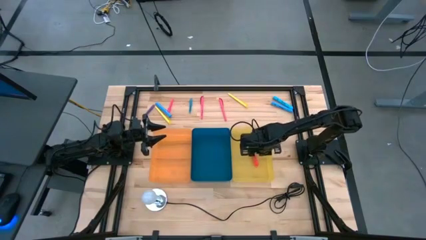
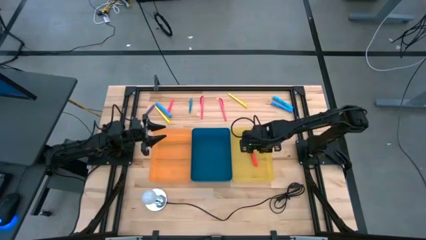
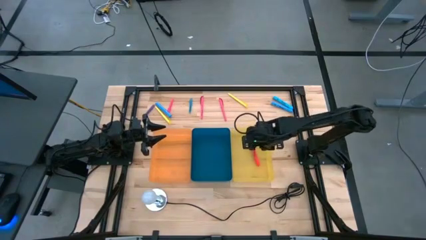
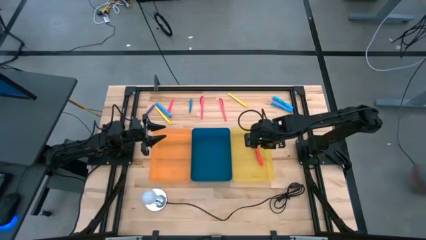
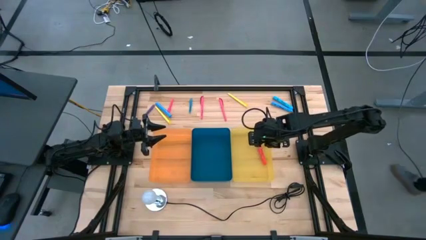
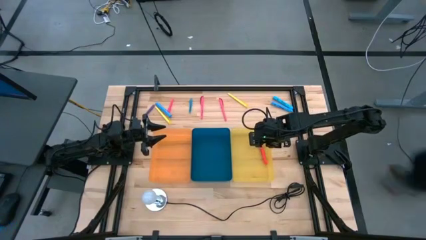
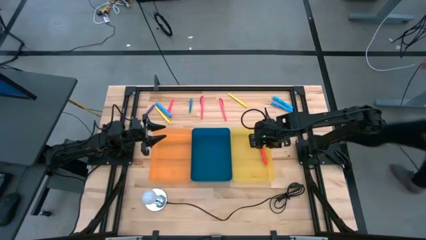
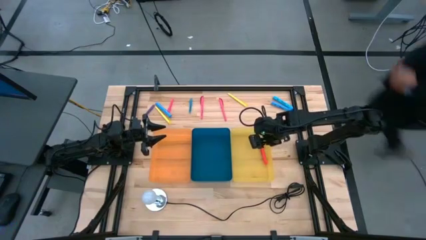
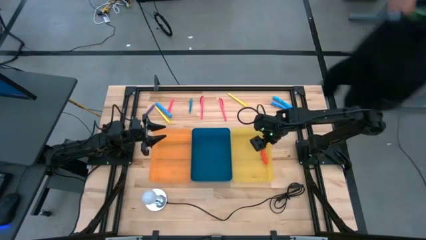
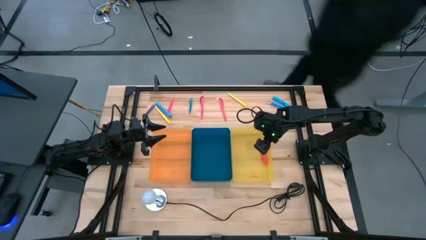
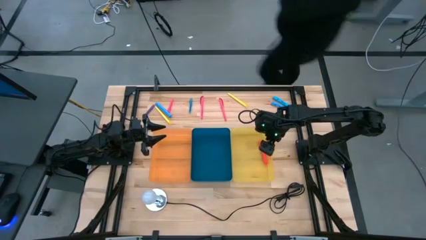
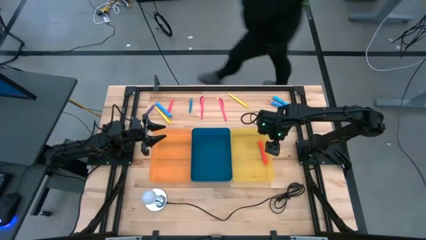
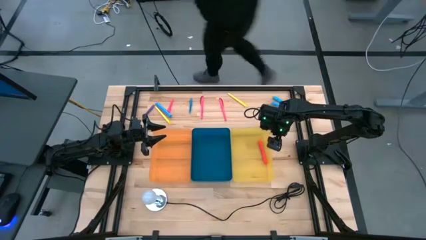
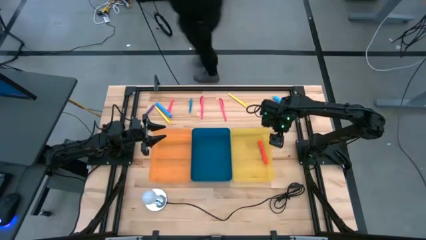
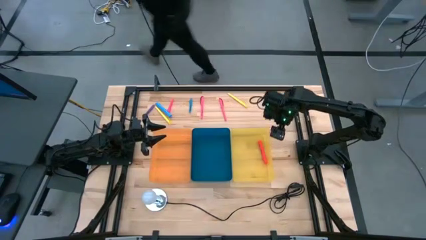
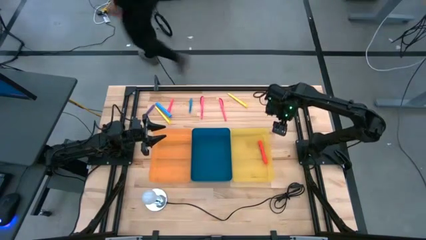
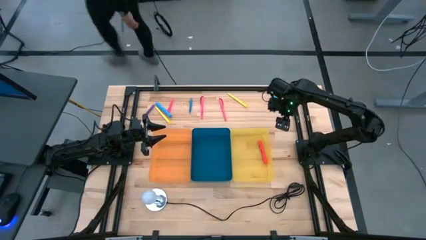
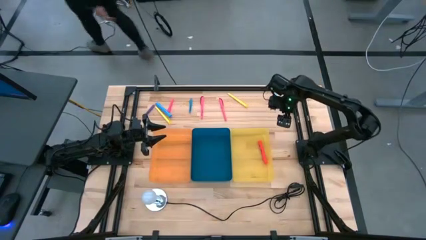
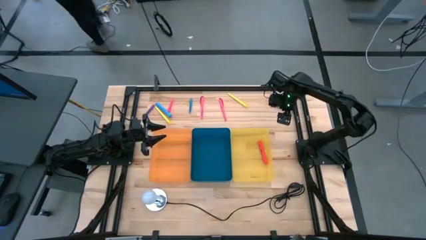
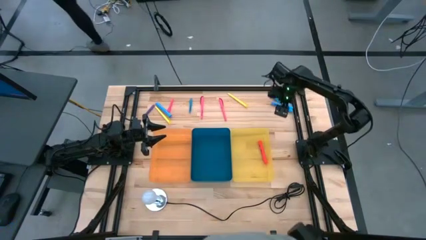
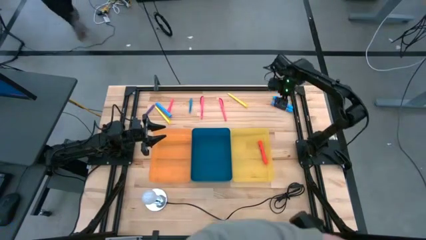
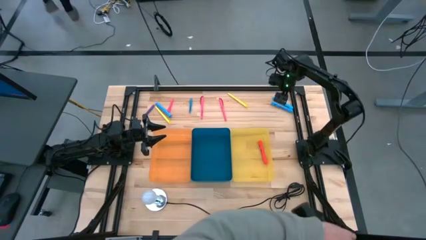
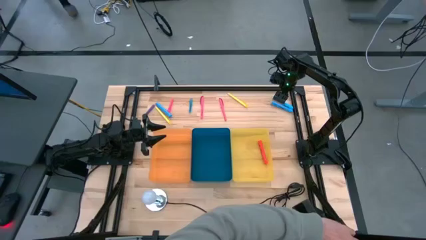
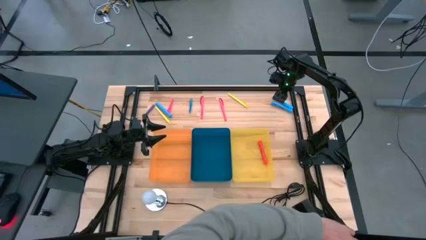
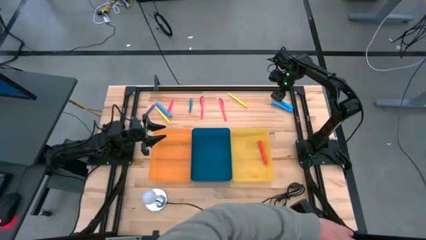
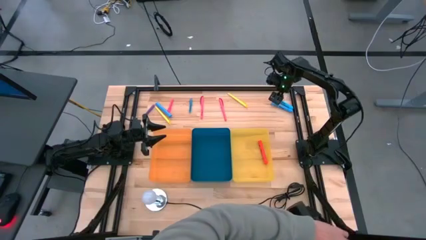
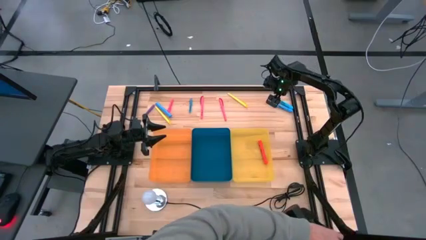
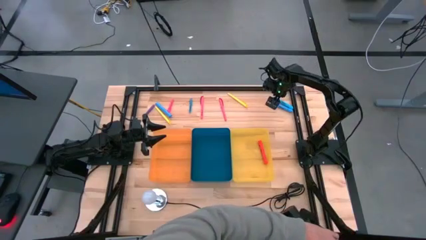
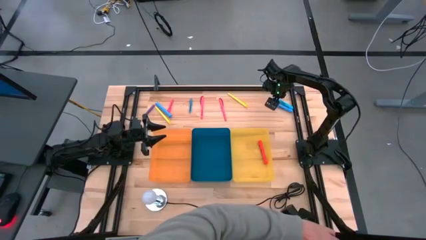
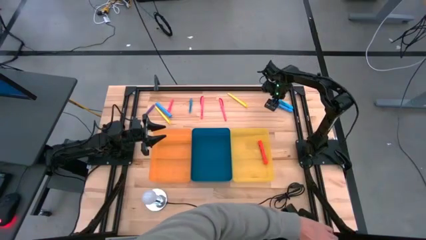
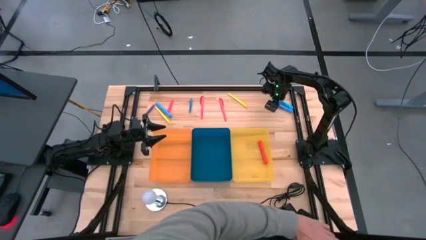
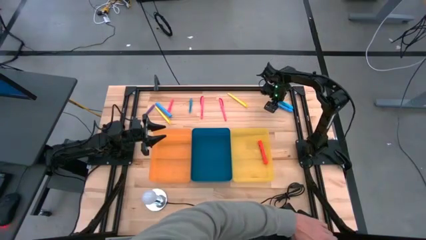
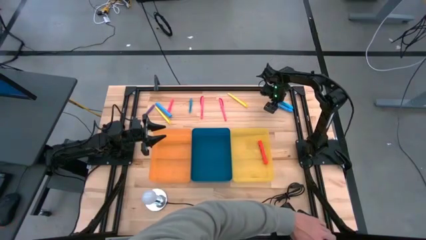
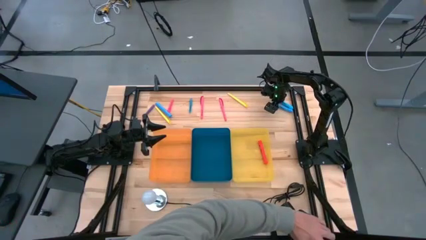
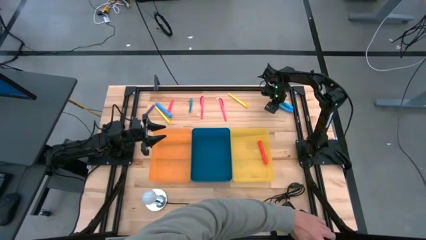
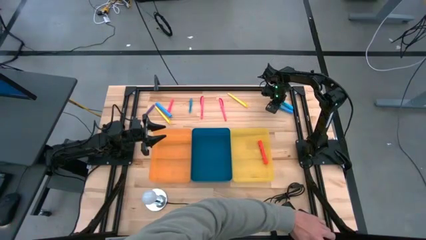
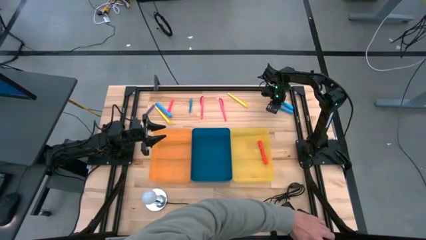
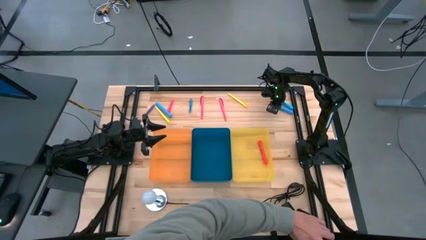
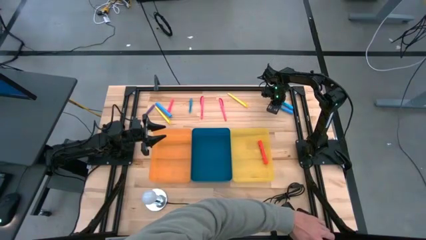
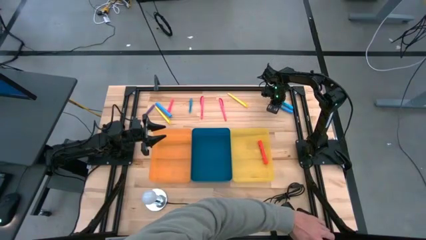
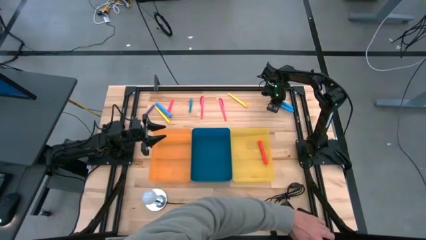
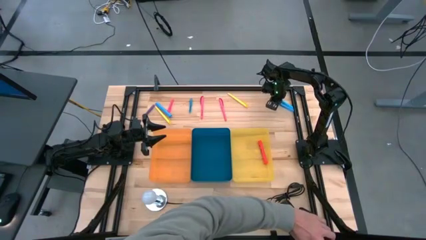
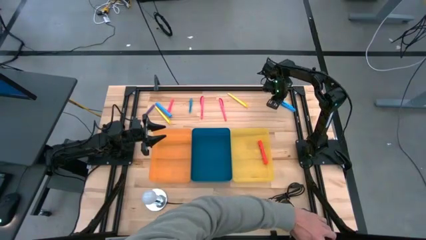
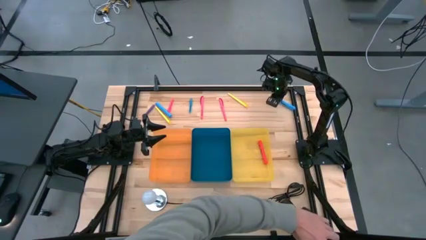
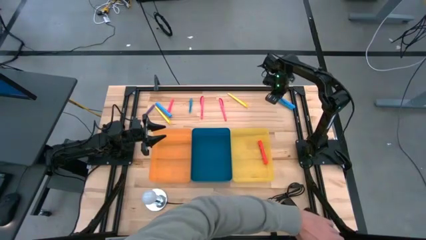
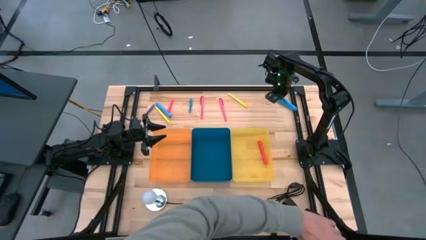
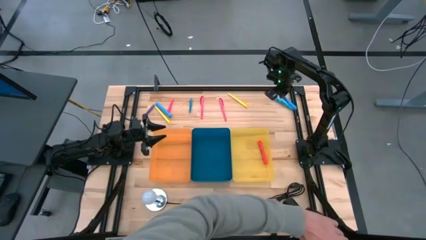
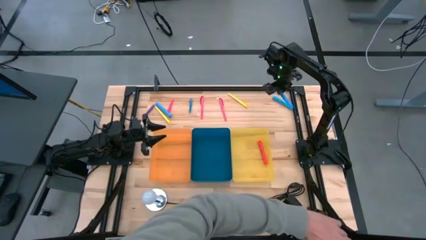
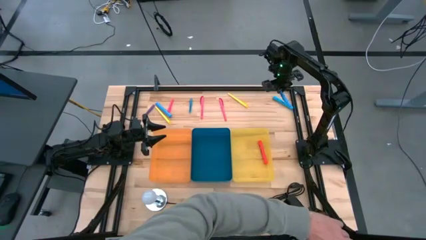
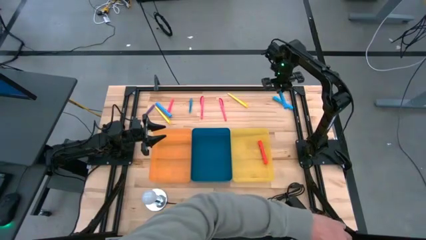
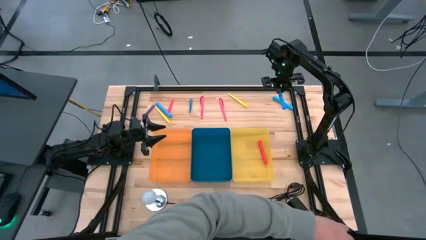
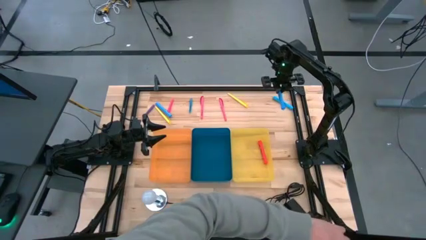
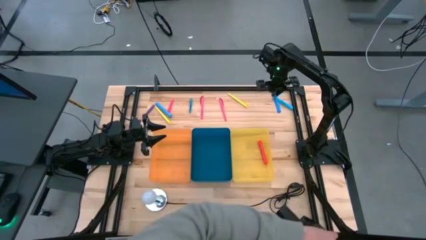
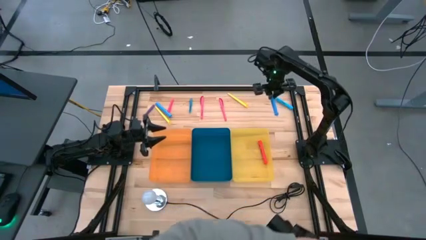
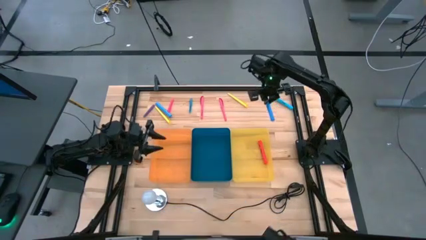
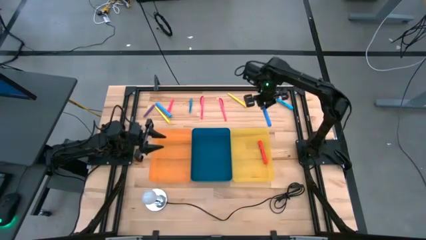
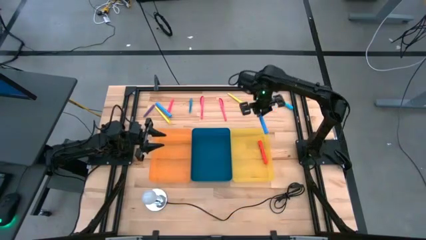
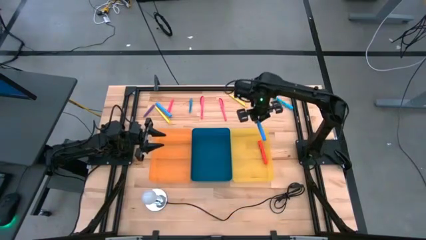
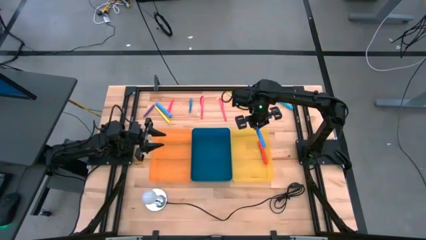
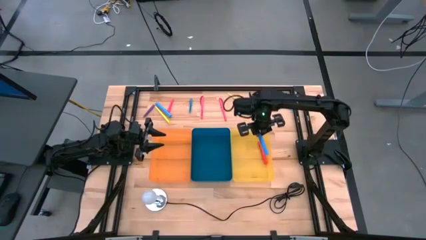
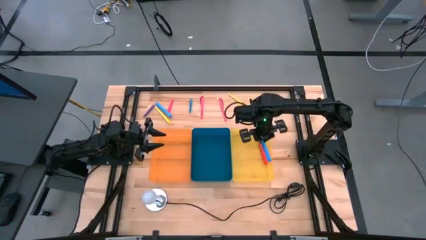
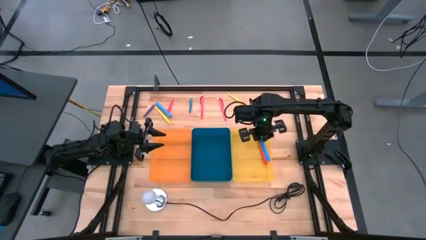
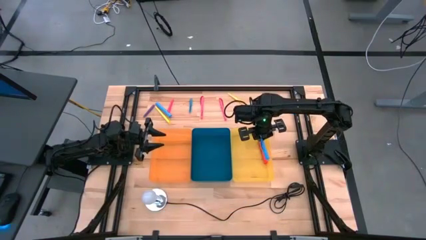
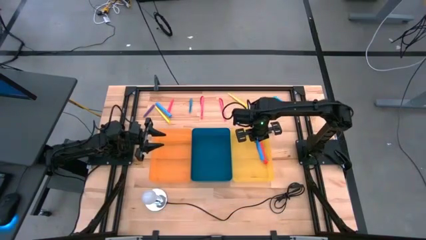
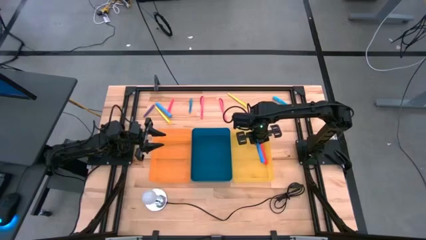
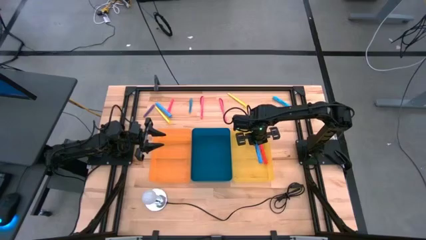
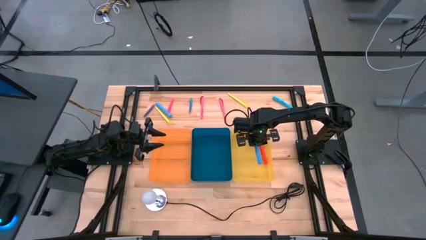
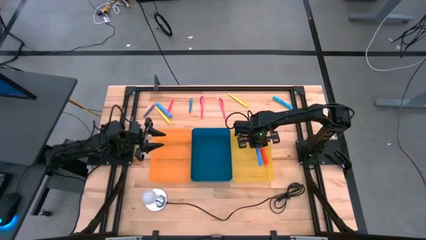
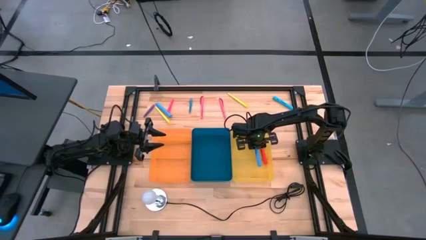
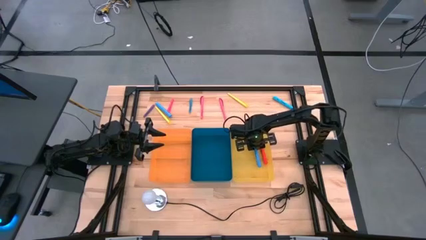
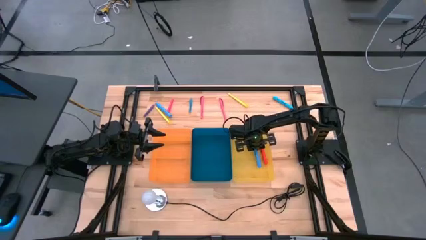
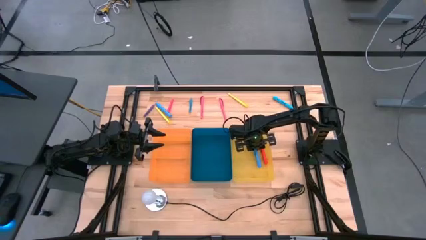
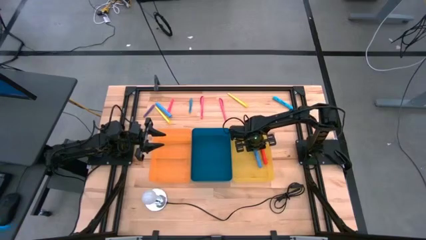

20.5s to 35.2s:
Task: Pick & Place Markers
Put the middle blue marker into the yellow bin
